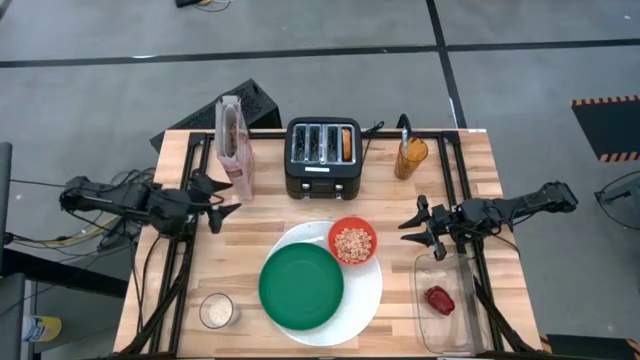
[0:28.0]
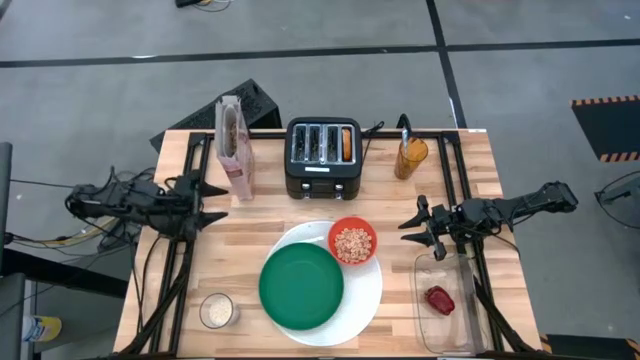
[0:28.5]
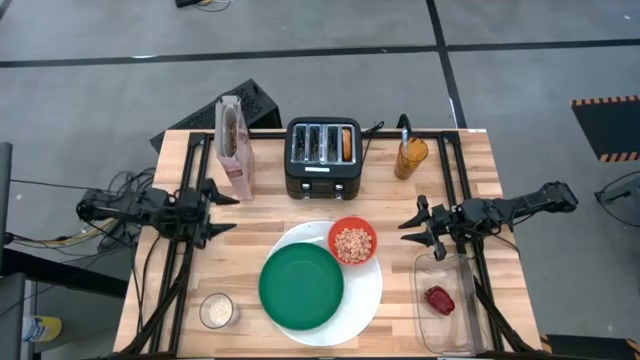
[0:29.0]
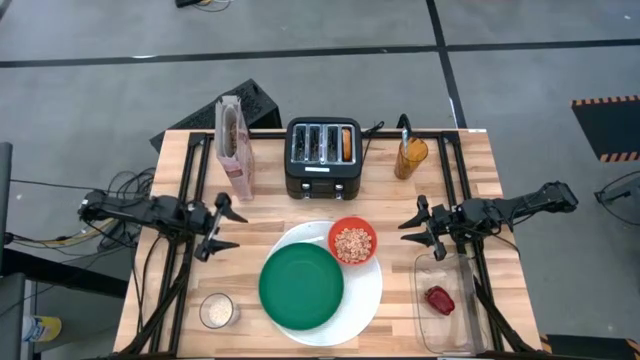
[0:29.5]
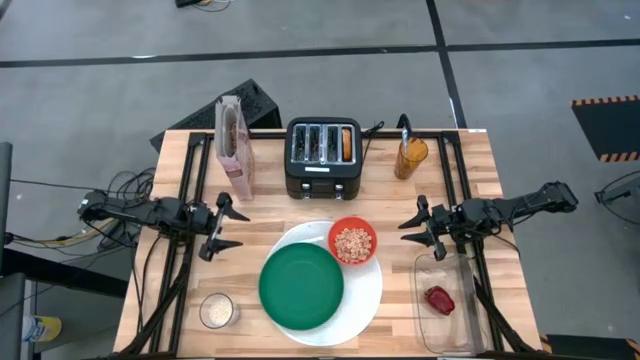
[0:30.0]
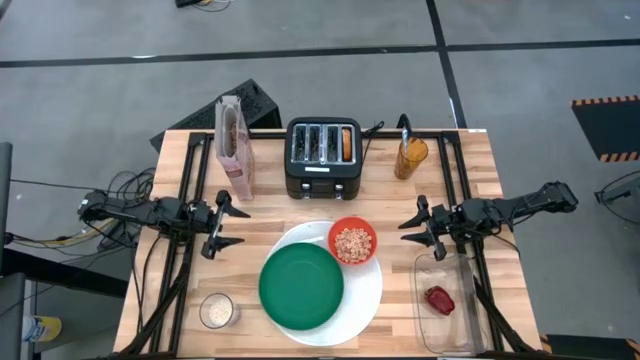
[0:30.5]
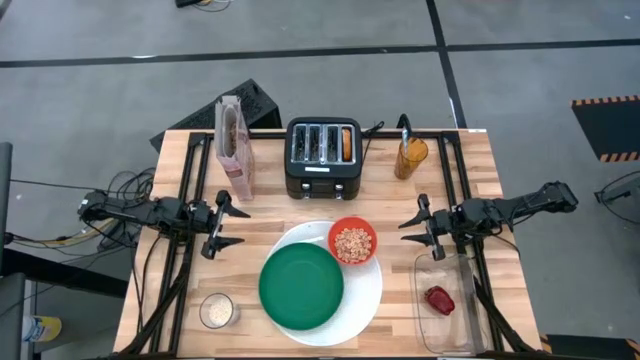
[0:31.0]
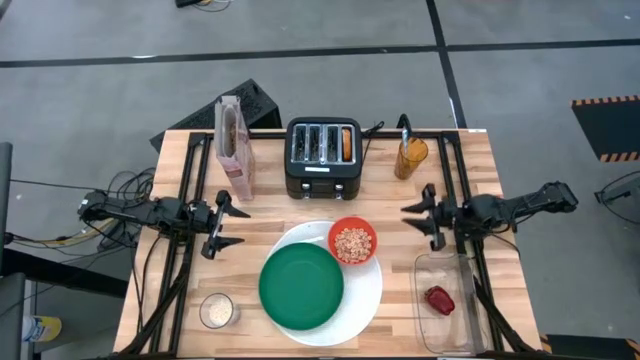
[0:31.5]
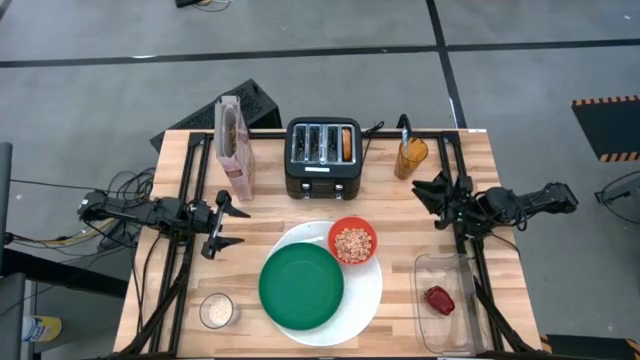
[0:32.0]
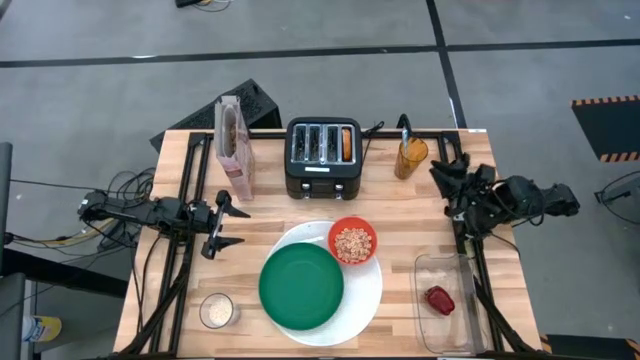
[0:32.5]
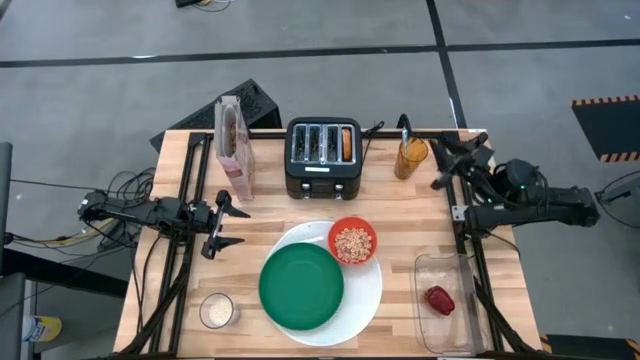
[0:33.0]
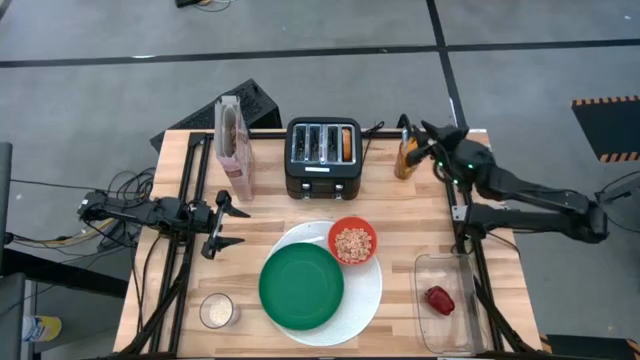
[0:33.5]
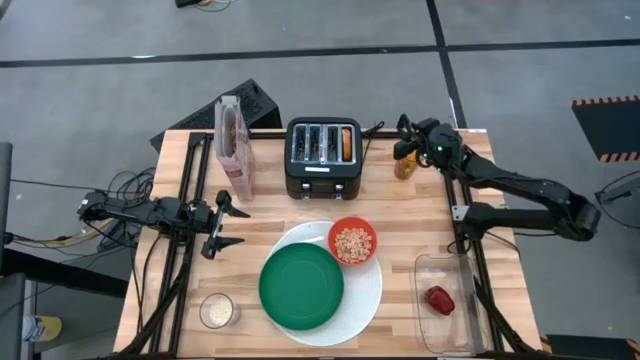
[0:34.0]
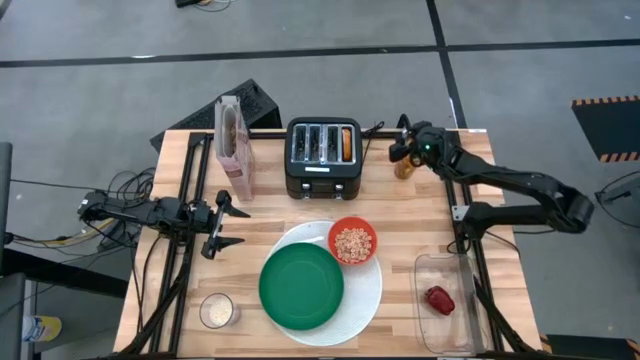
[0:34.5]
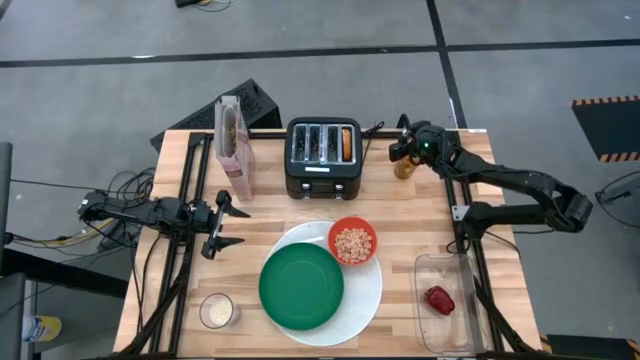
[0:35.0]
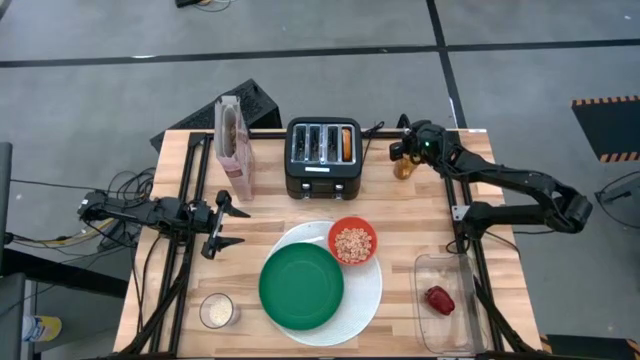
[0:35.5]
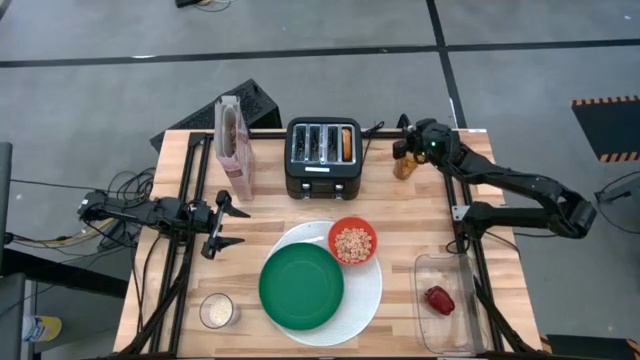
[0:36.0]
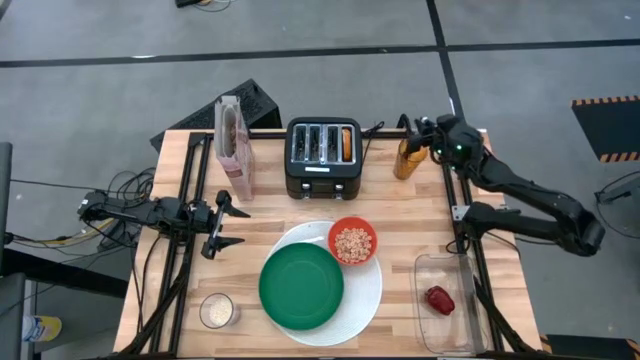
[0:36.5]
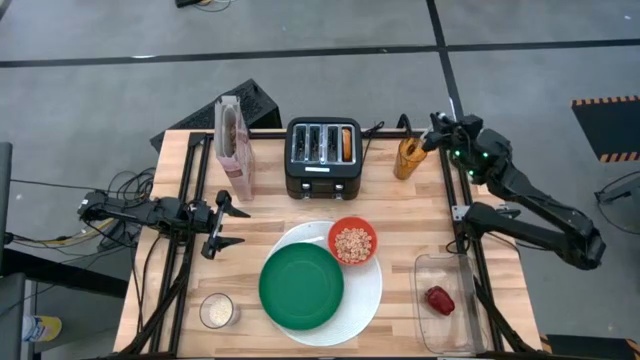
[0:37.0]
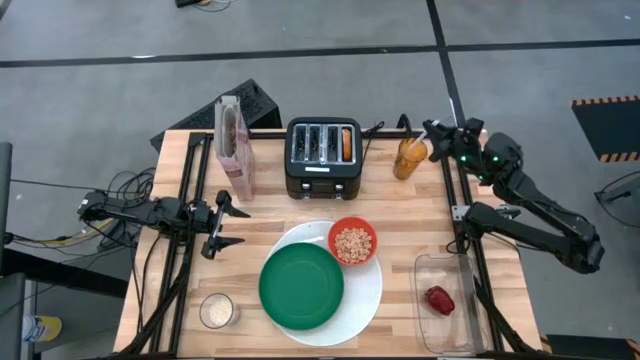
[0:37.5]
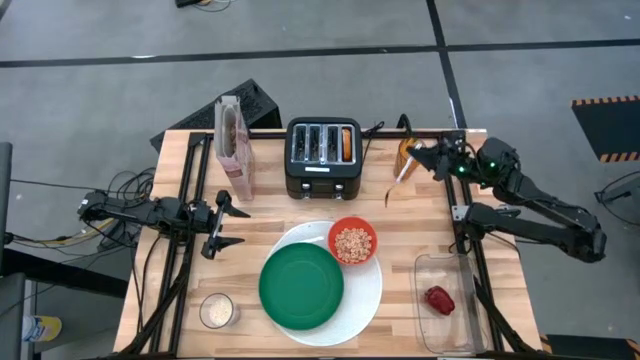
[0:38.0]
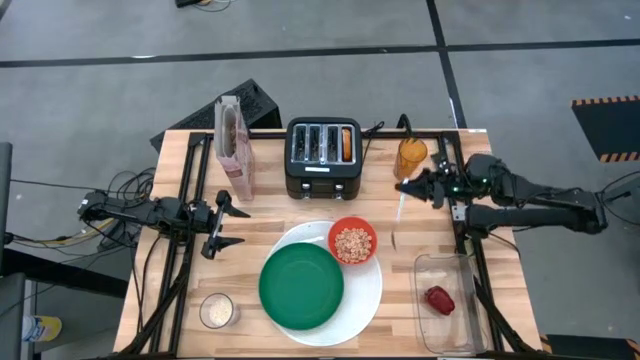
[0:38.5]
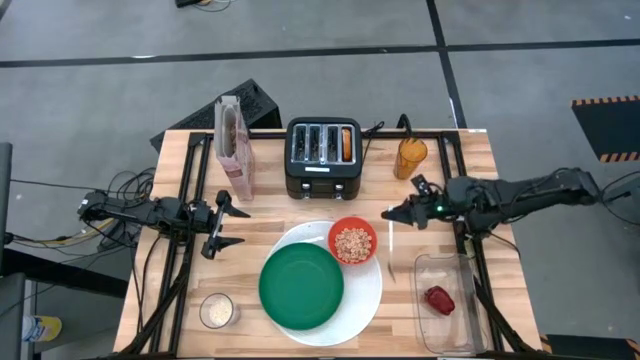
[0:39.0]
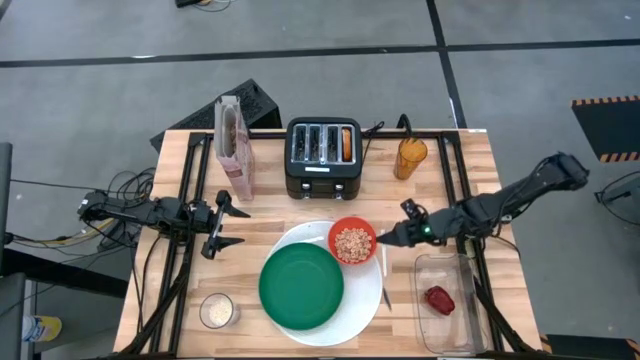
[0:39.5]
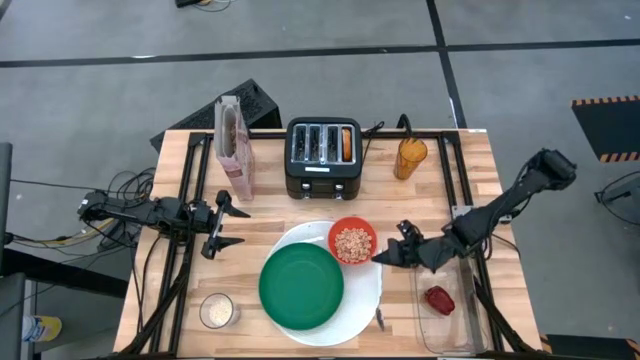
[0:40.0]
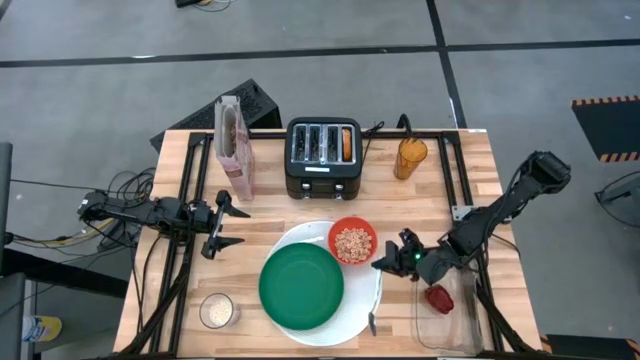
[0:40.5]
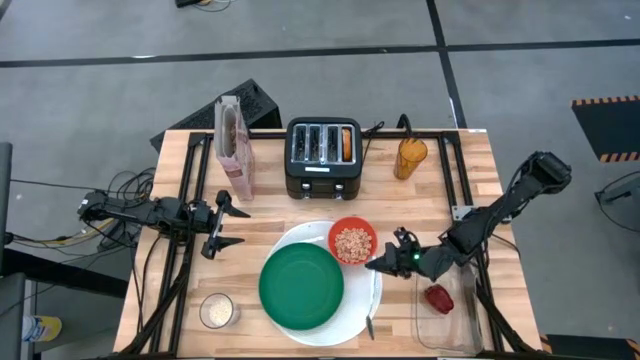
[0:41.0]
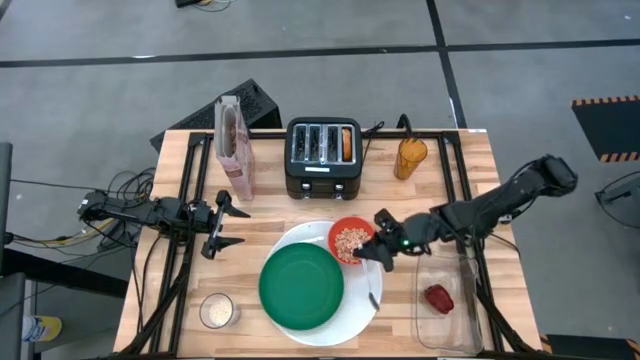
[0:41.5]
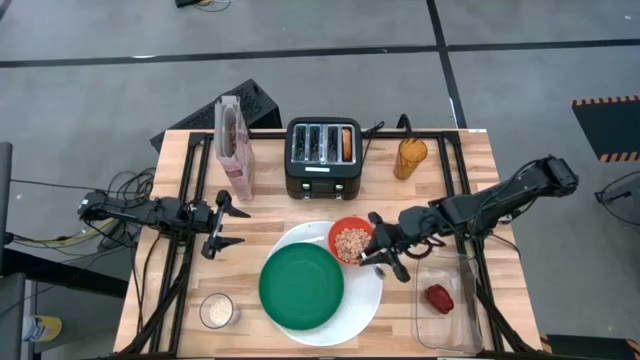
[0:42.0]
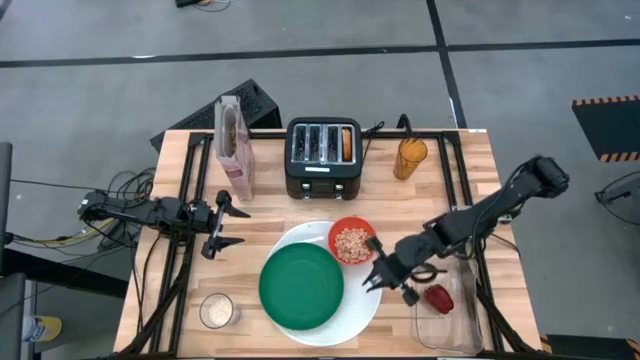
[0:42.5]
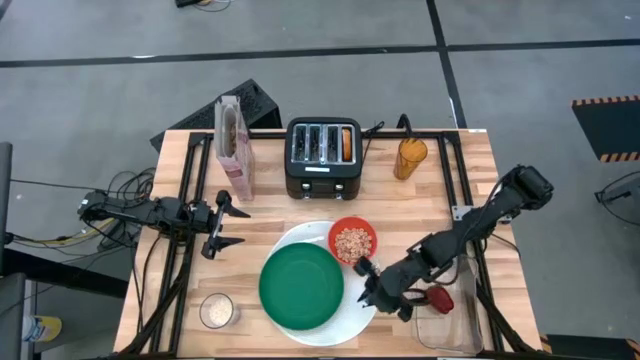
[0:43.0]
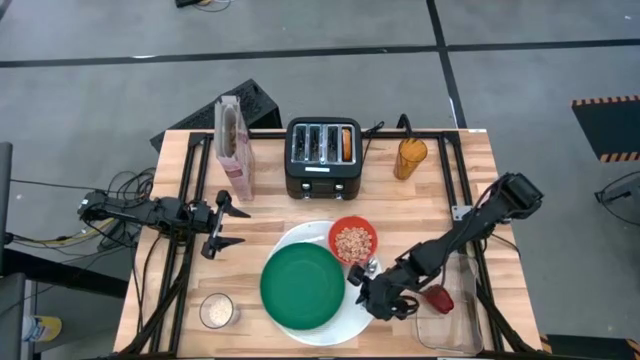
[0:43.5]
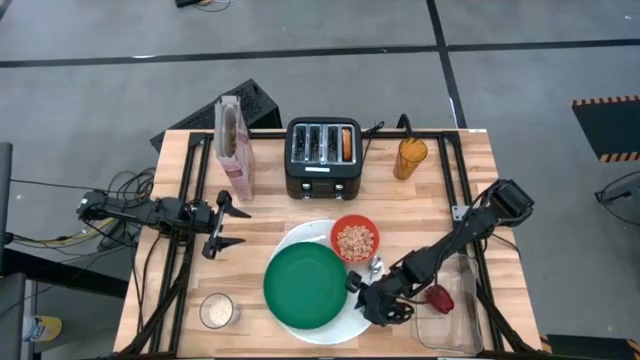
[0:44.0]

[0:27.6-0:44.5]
Task: Arrange a breakfast setting
Put the spoon from the brown cup to the right of the green plate on the table mat

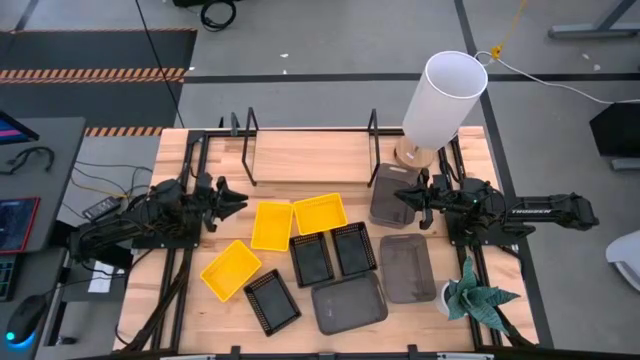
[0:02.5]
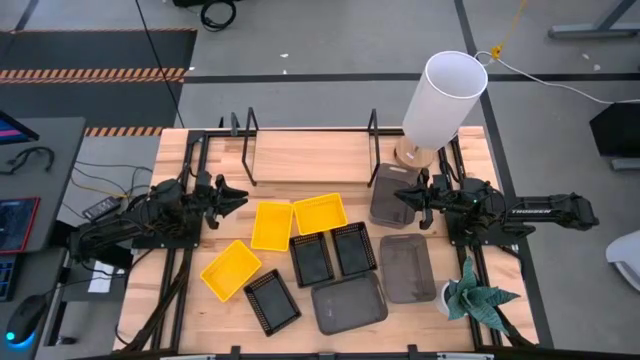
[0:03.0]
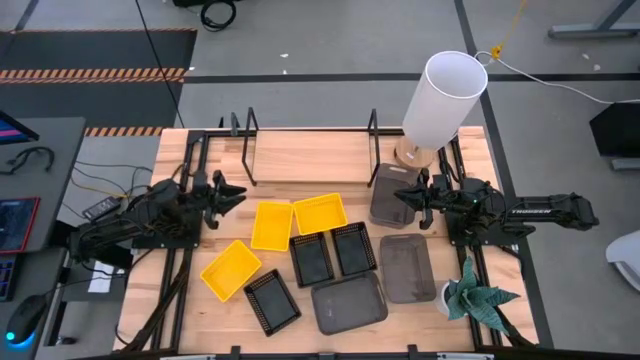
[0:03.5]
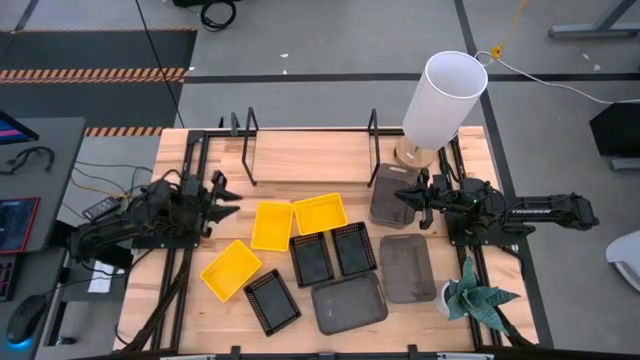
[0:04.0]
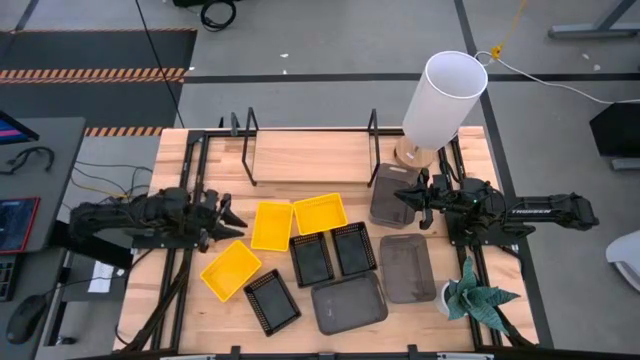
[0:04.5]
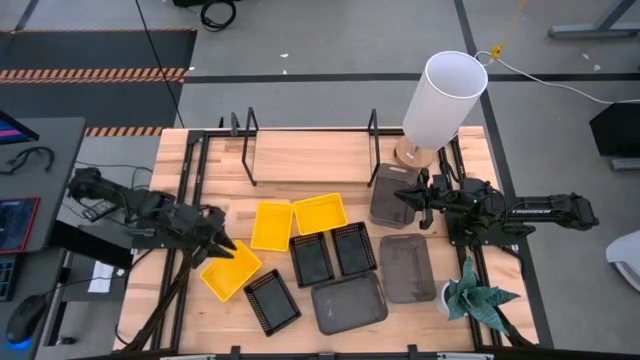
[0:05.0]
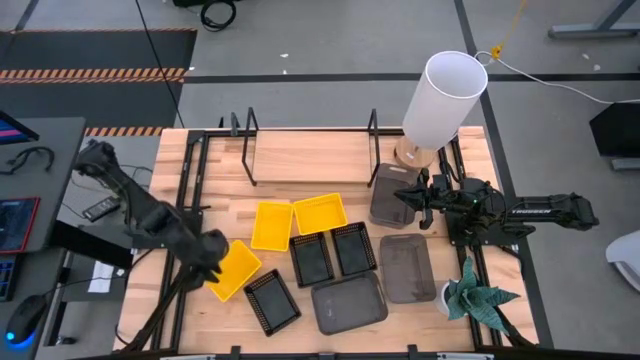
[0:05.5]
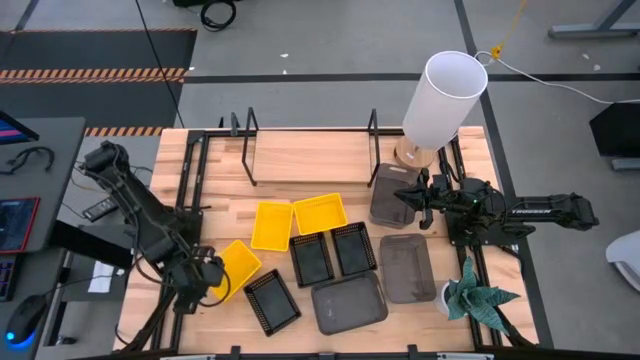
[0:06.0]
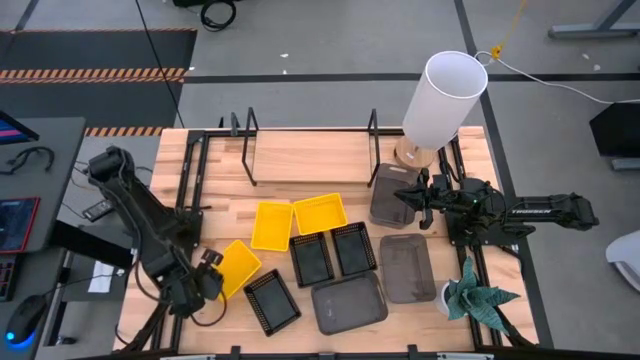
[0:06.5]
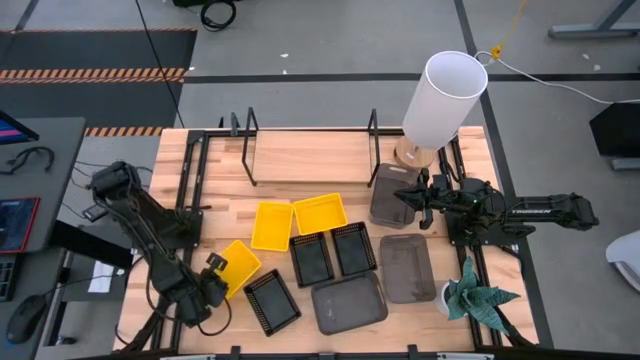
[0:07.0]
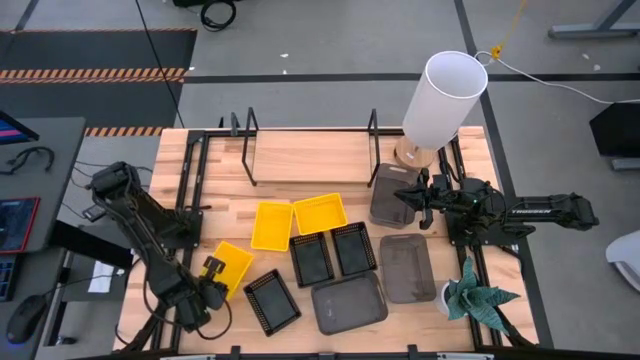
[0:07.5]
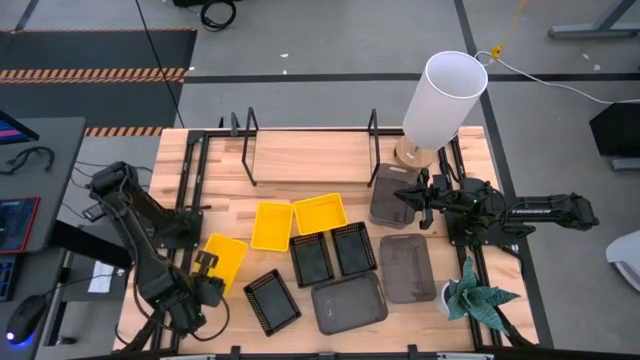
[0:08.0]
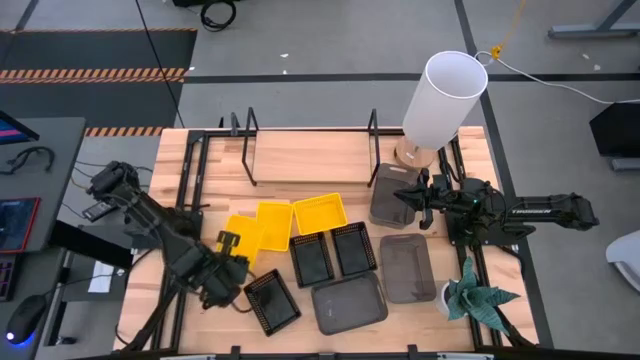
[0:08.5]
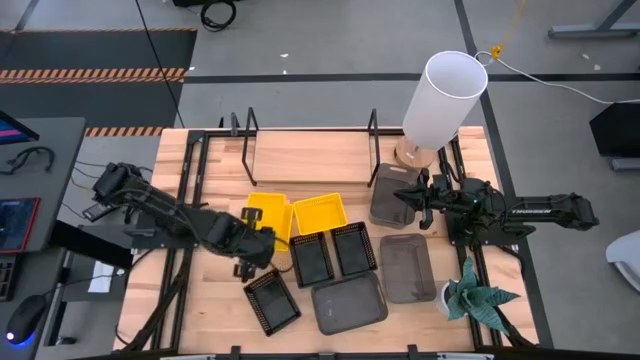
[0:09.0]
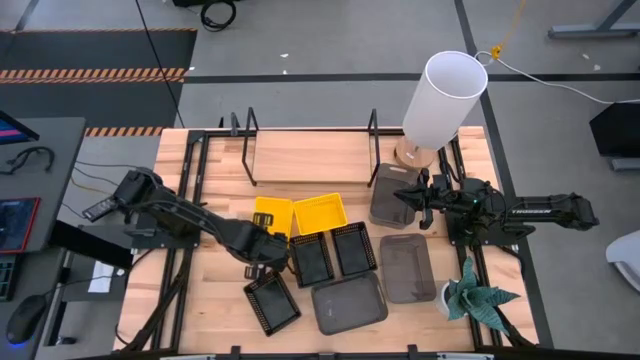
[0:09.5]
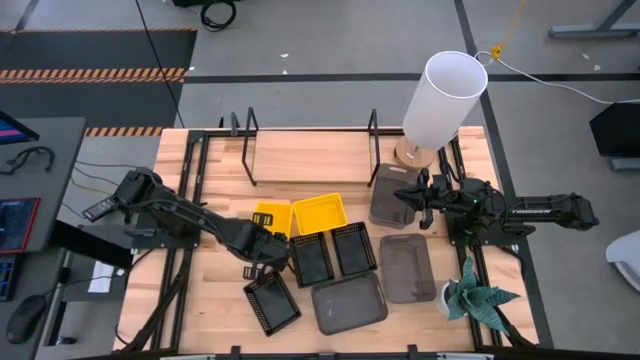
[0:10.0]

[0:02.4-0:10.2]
Task: Stack baskets on shelf by color
Stack the bottom left yellow bin on the middle yellow bin
